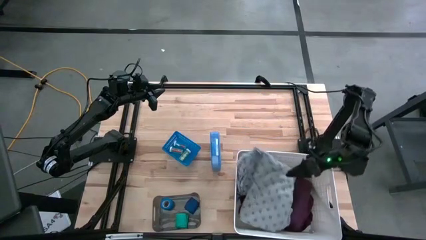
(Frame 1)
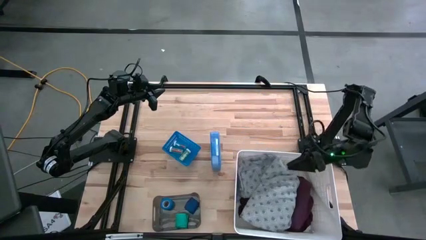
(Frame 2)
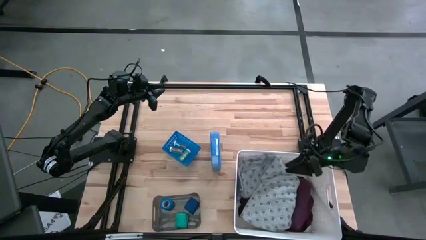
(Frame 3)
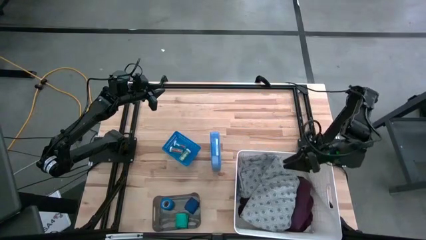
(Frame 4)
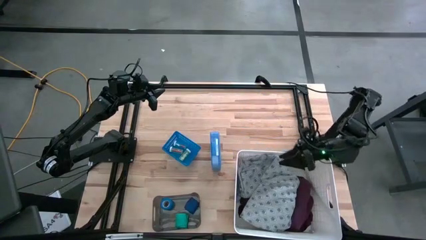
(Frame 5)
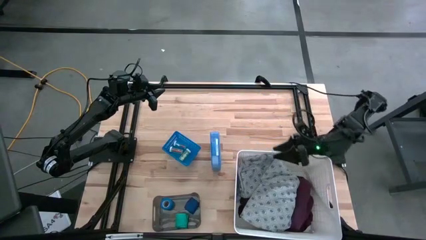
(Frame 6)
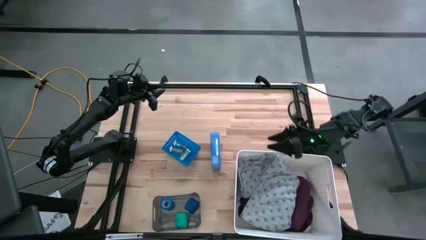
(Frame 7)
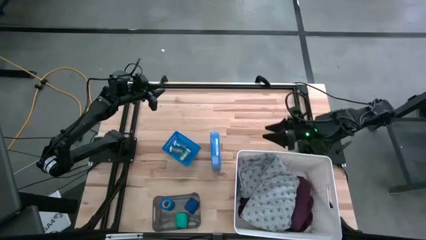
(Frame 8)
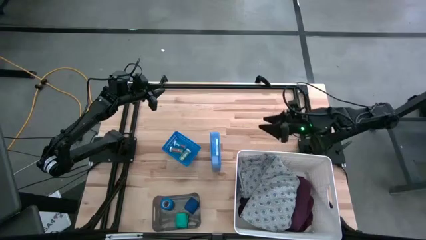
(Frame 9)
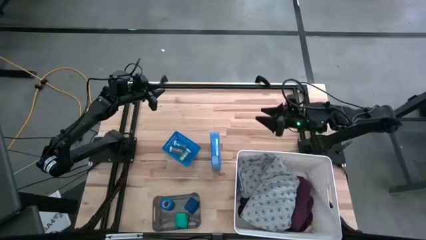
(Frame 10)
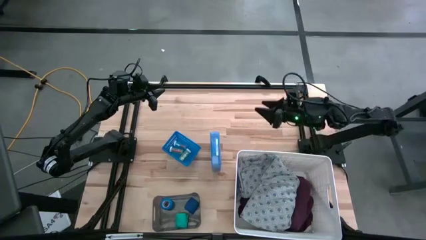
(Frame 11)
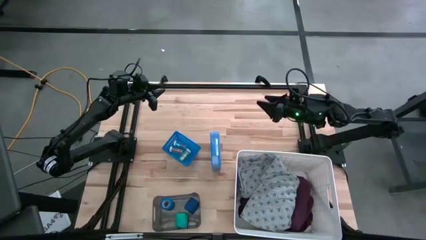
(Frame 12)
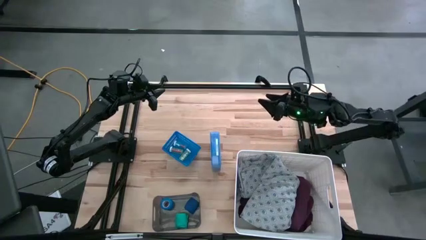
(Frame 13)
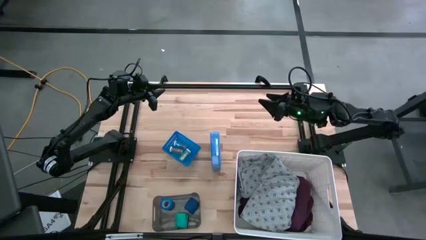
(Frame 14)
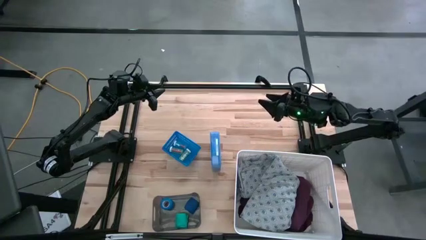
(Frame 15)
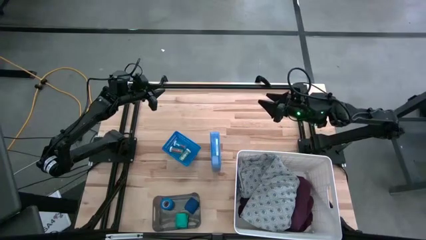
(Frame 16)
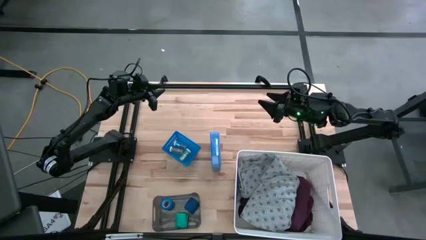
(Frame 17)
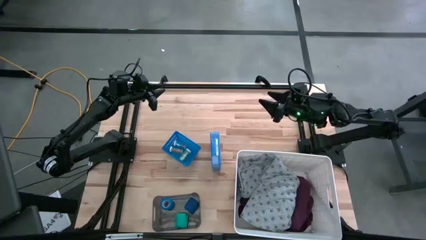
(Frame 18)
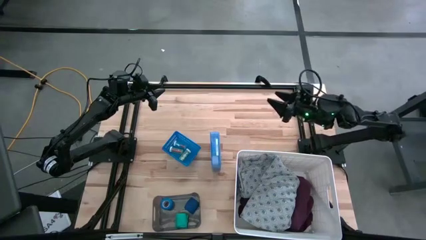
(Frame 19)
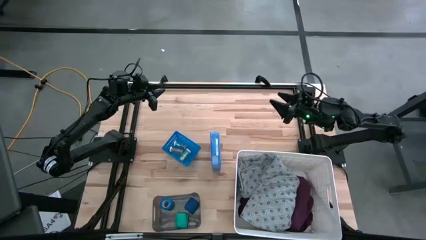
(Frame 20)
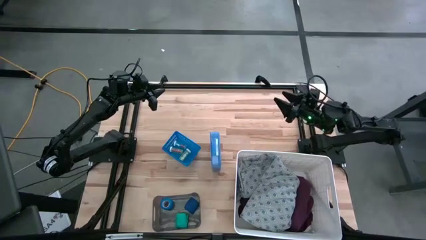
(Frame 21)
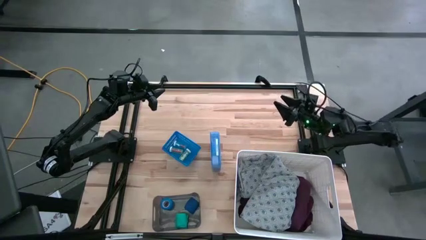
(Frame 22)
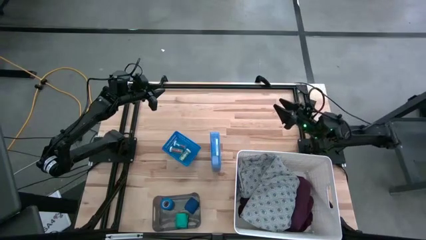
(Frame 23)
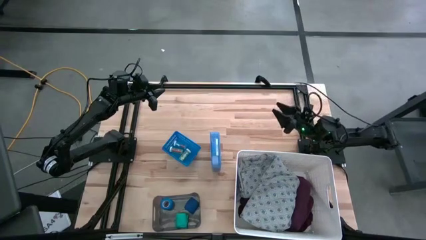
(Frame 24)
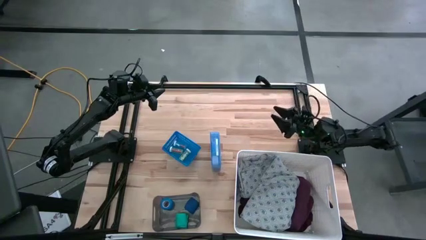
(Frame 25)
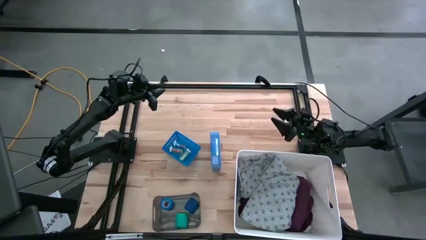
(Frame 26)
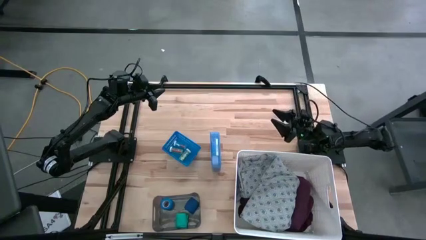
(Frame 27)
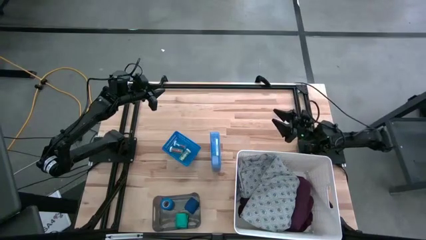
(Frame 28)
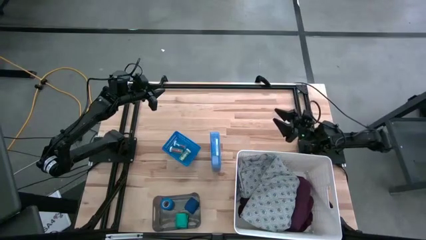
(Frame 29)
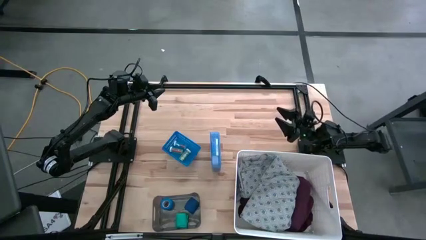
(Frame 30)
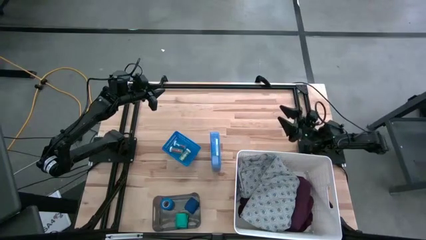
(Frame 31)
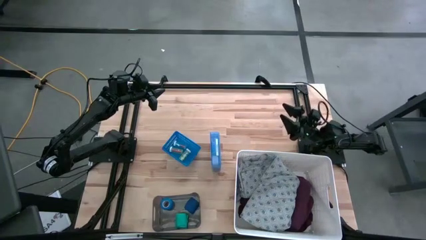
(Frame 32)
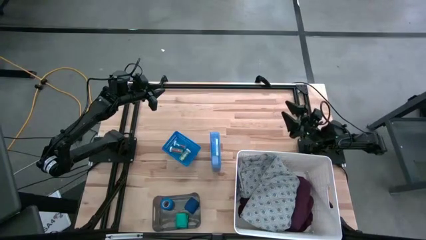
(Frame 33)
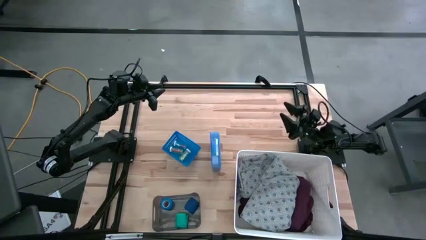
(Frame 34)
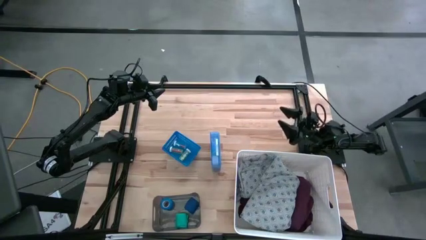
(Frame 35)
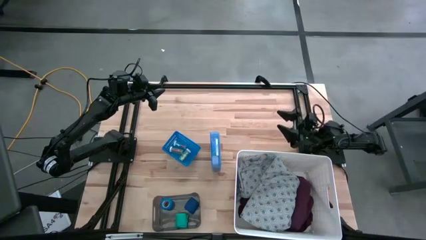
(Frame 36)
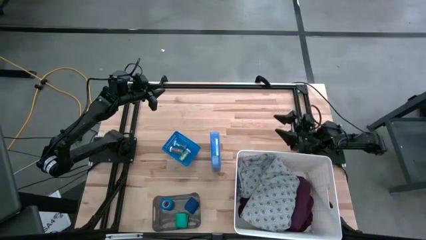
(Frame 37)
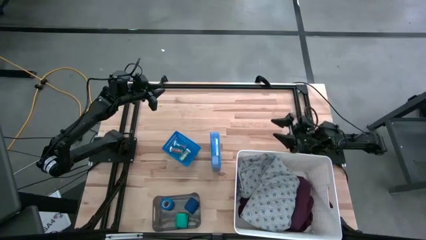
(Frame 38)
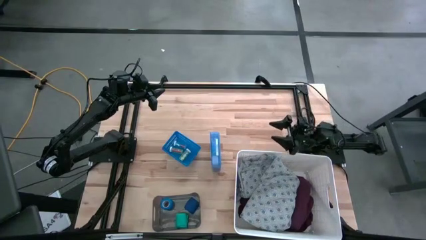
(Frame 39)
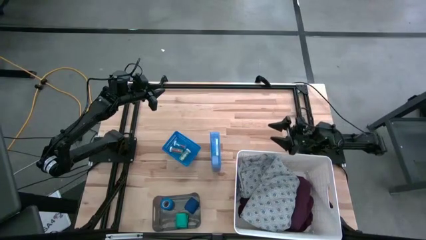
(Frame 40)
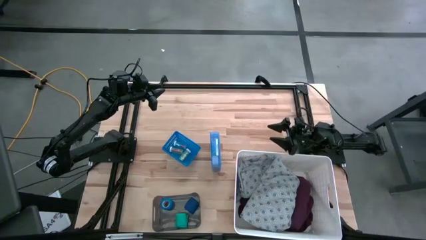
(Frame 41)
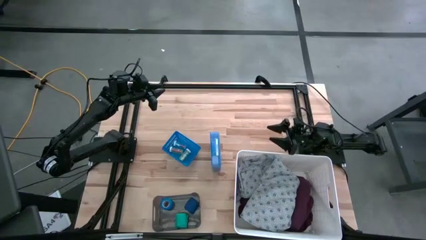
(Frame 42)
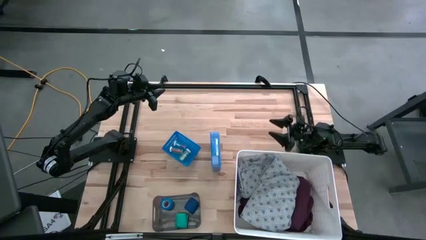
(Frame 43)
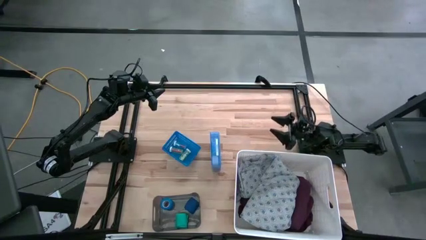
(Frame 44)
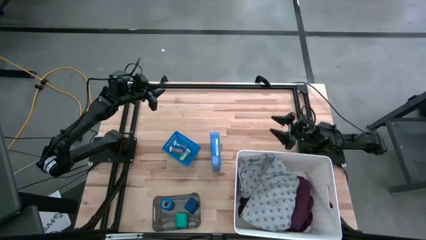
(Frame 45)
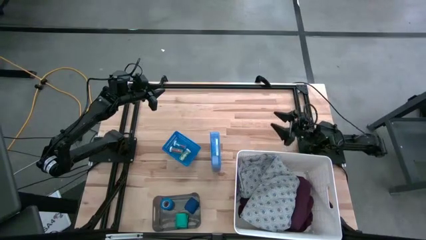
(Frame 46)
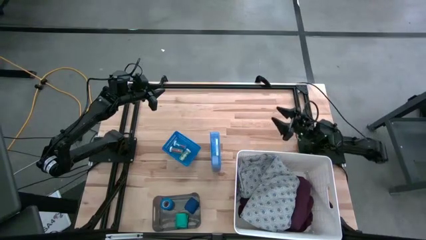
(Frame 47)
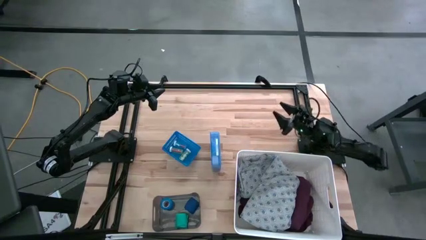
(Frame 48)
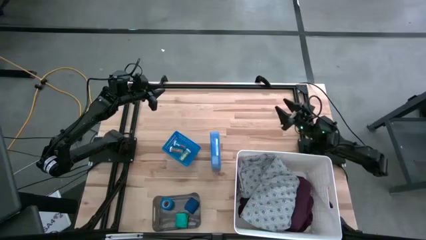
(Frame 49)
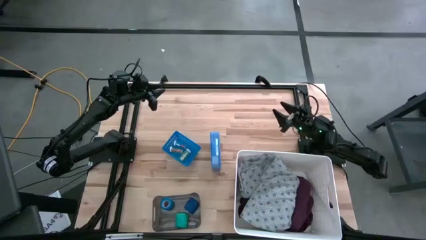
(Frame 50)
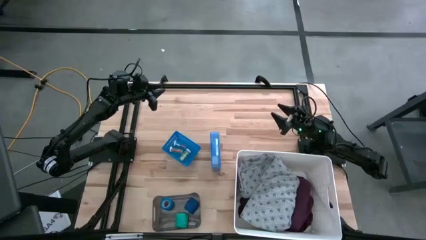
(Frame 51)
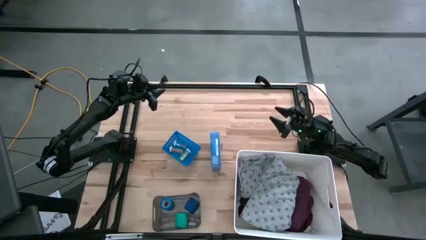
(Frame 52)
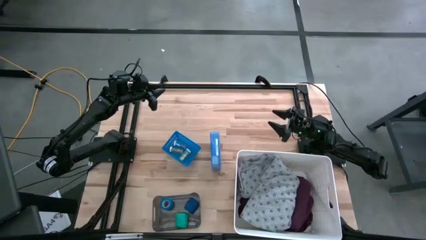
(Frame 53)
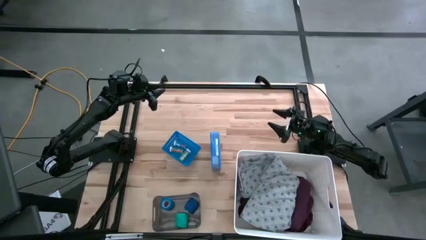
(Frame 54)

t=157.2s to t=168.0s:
Task: Pick & Place Medicine items
Return to Home Position
